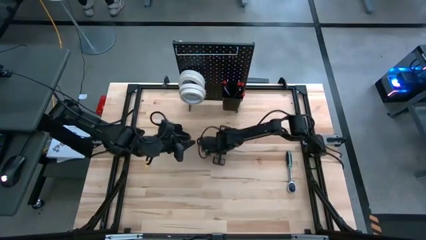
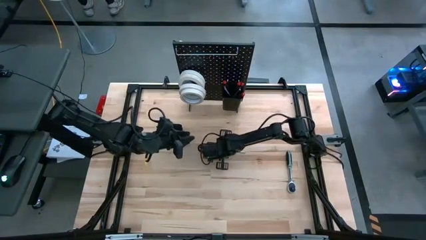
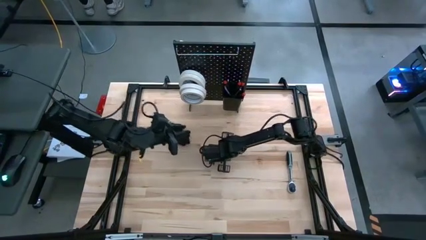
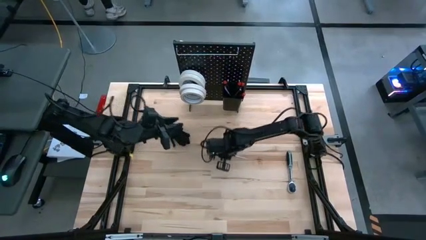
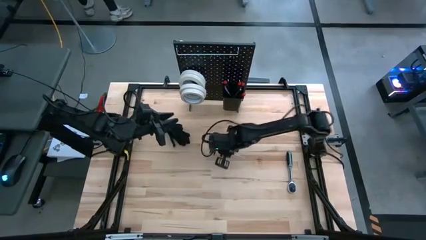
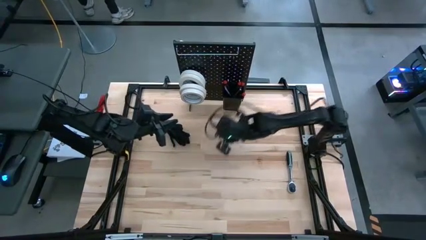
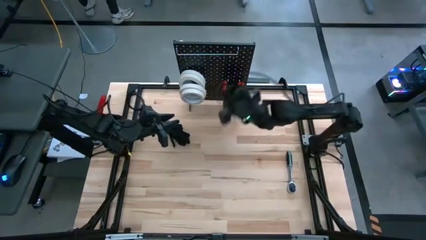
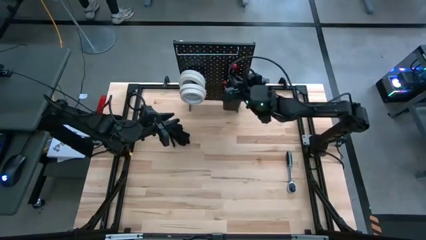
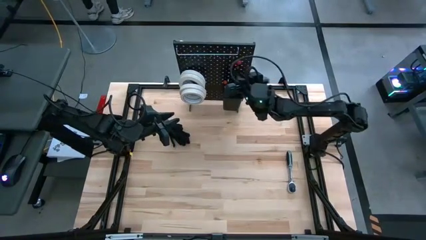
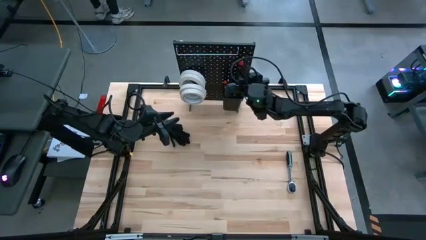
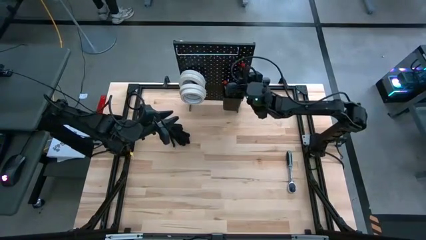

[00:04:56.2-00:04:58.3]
Task: Hang tools onto peg board
Put the black nut driver into the black bin on the peg board

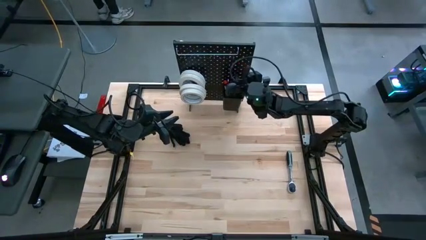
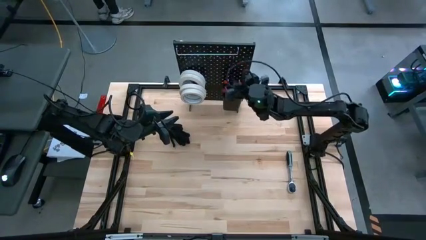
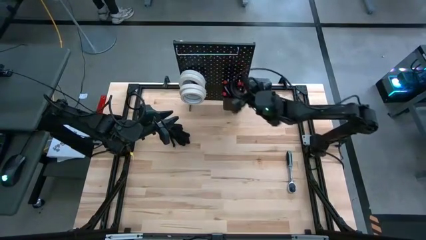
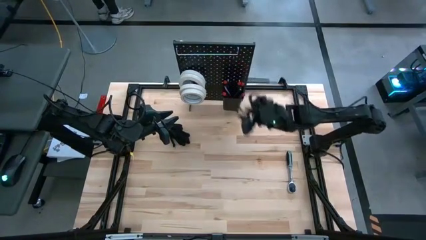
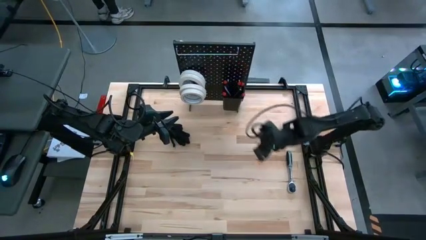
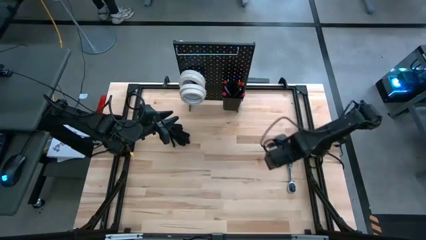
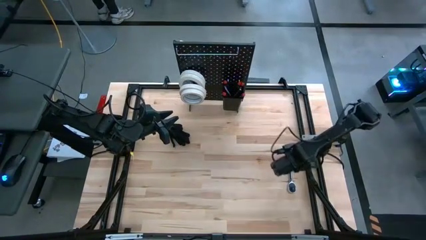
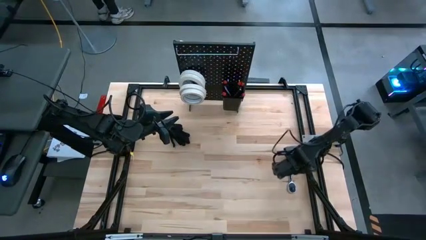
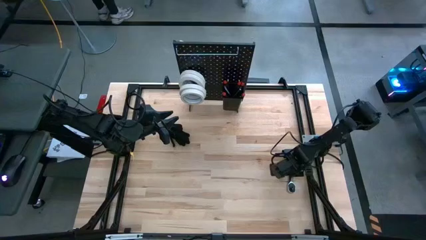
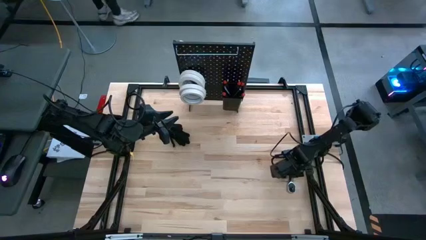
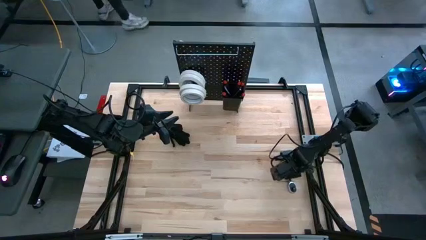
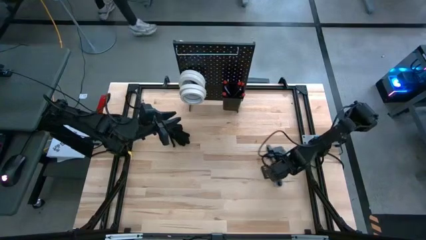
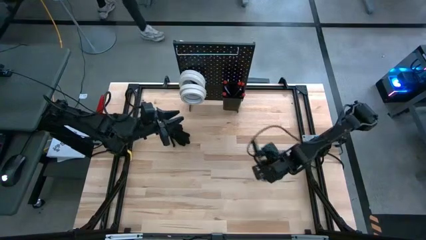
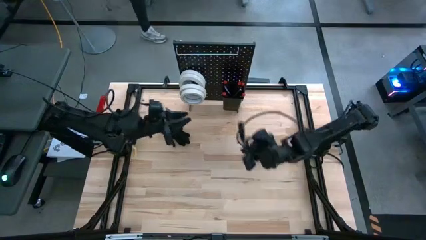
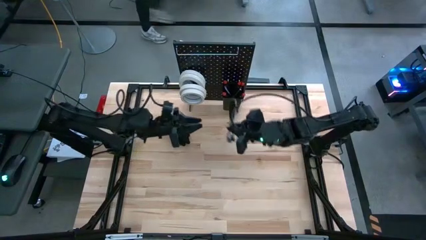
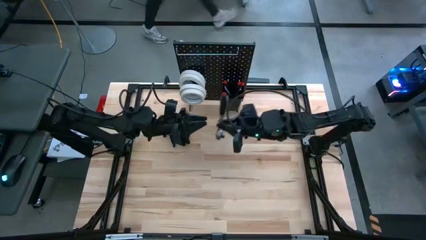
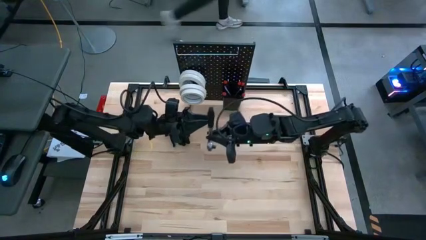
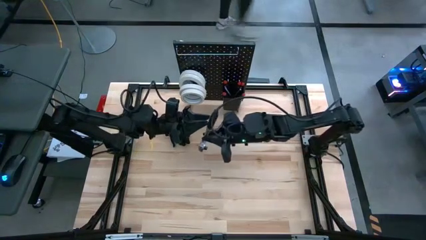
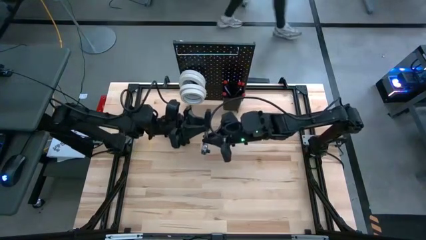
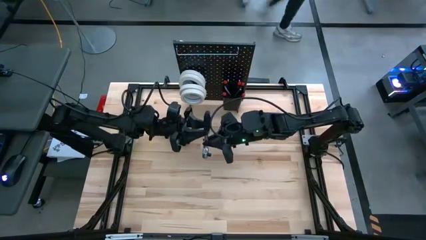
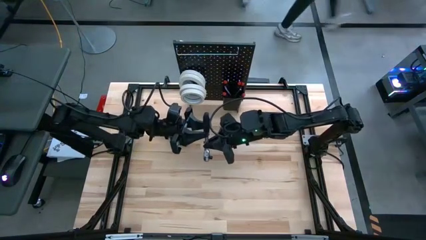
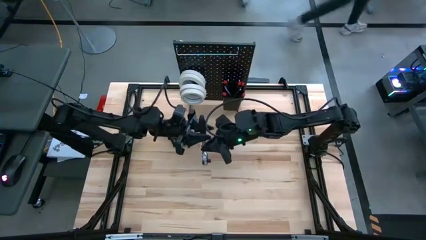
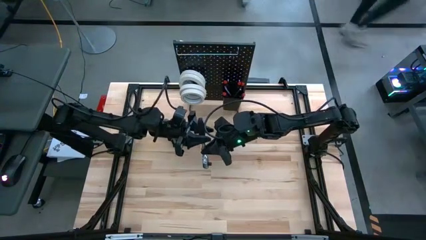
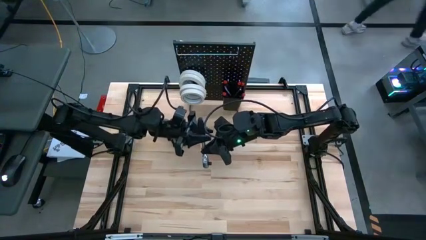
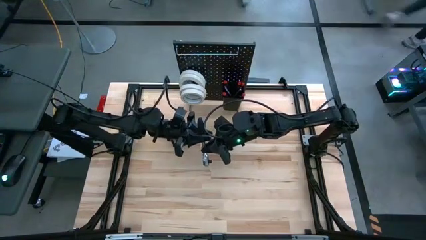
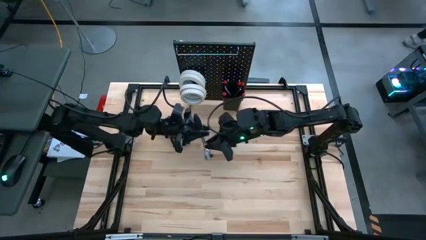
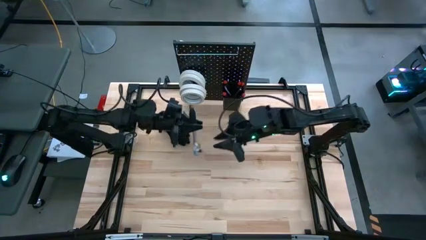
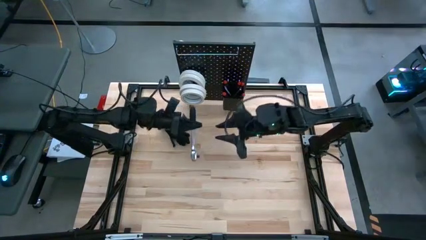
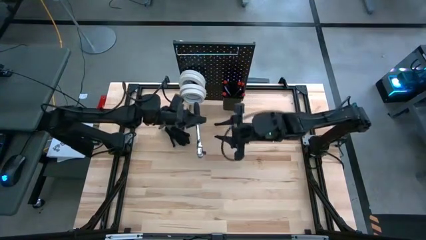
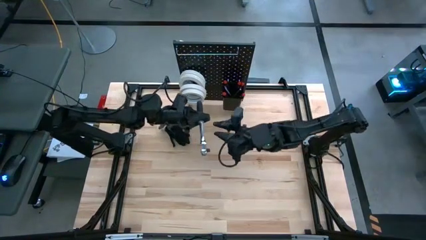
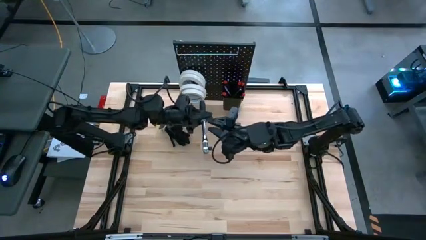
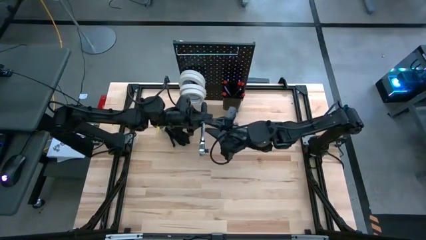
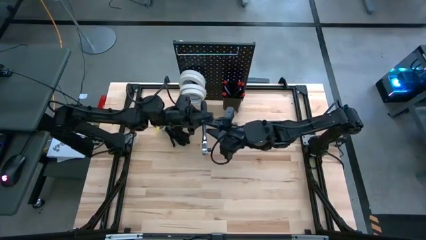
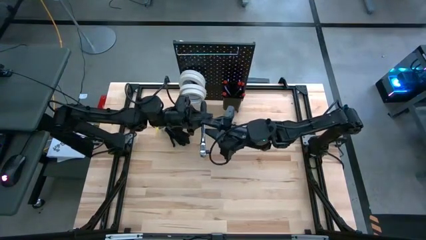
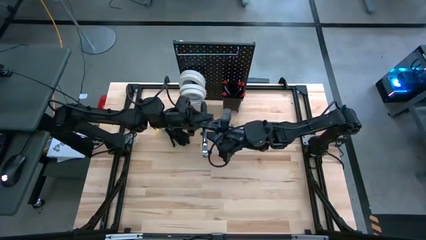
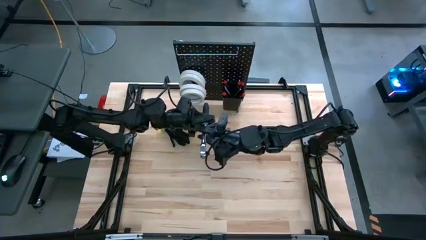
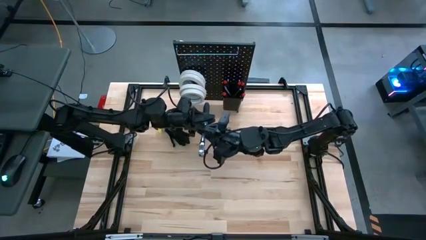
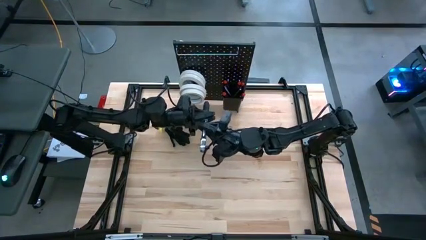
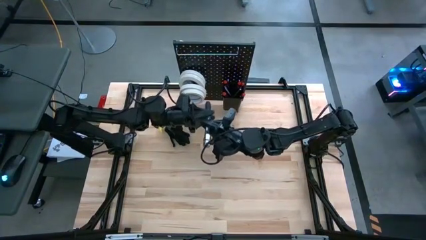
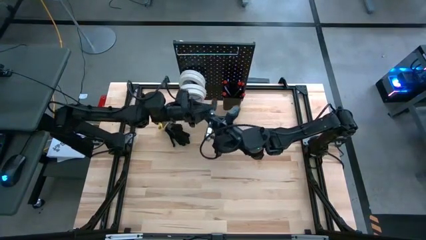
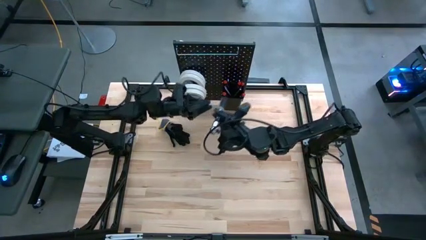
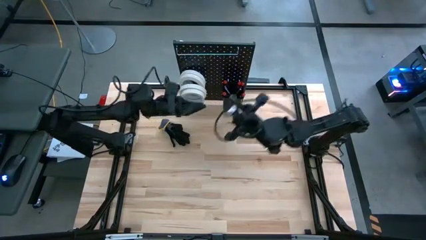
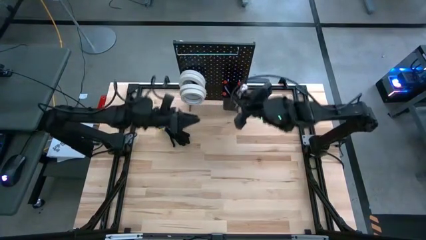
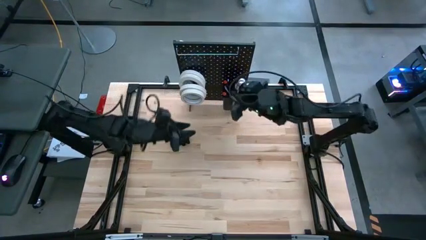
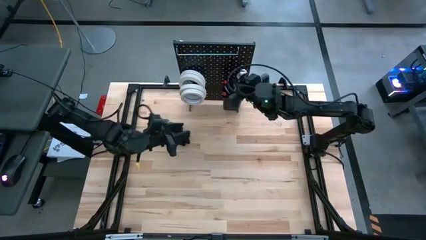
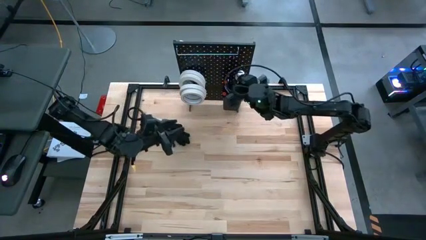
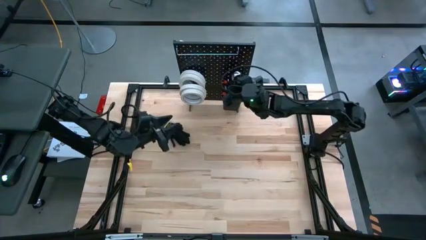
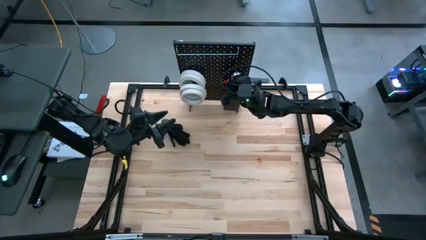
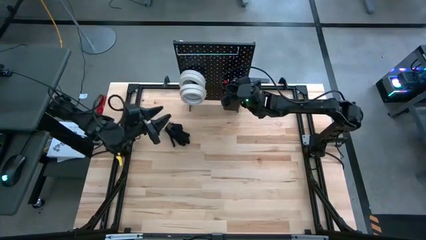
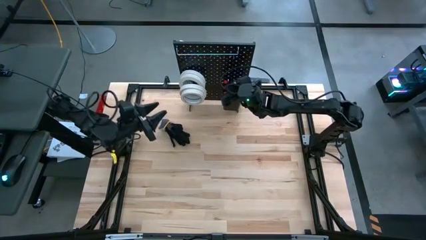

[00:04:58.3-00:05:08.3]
Put the black ratchet wrench into the black bin on the peg board

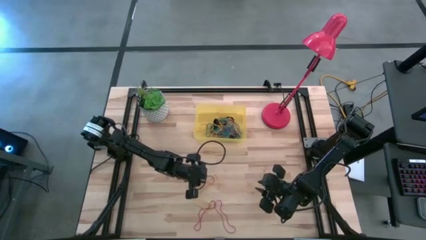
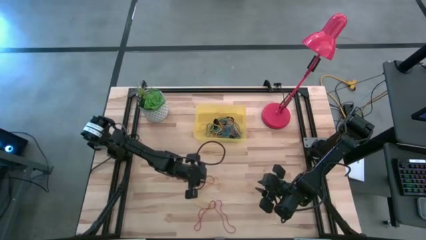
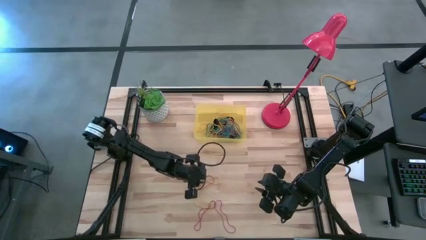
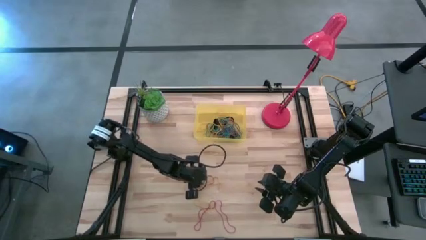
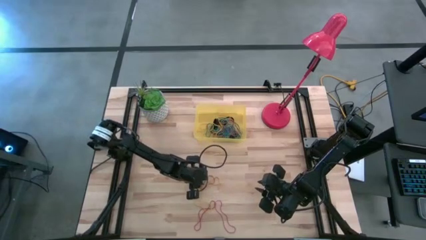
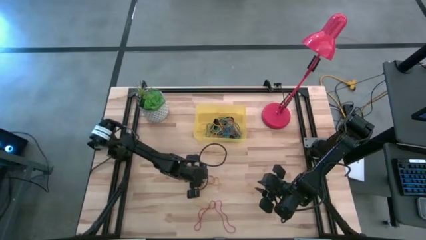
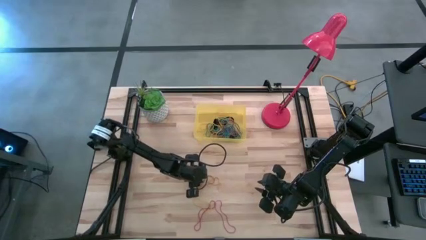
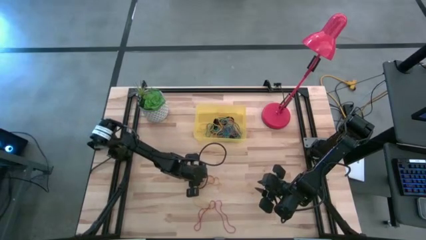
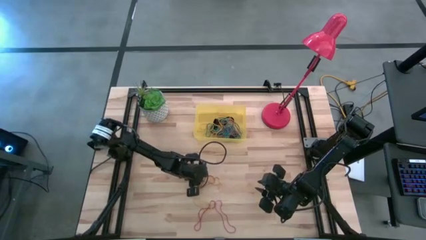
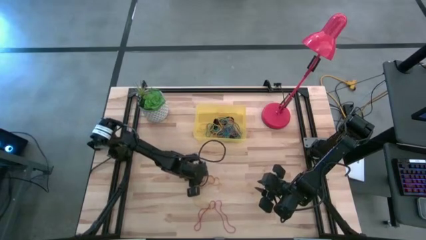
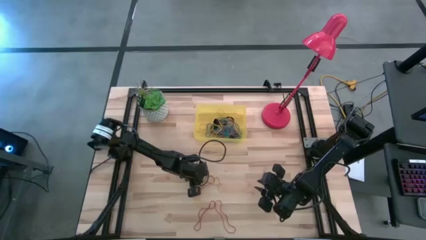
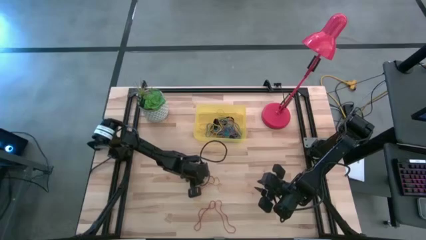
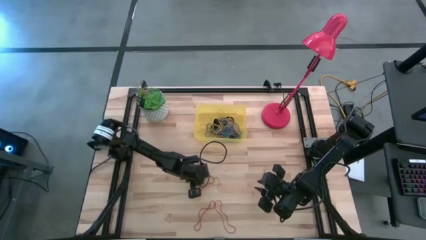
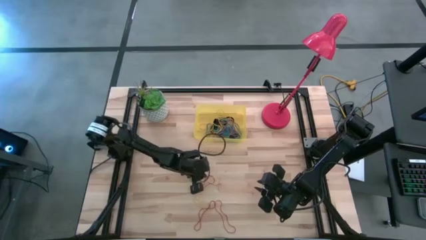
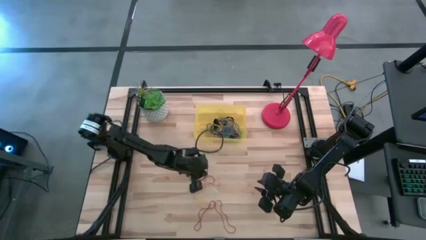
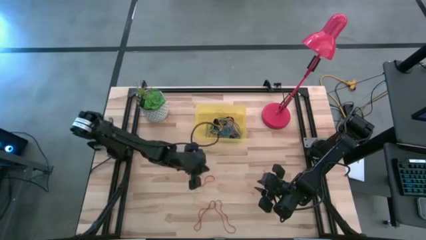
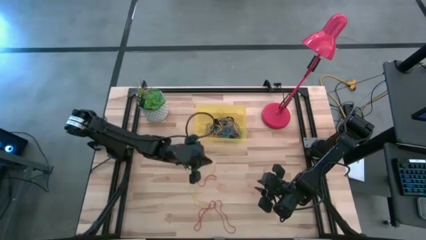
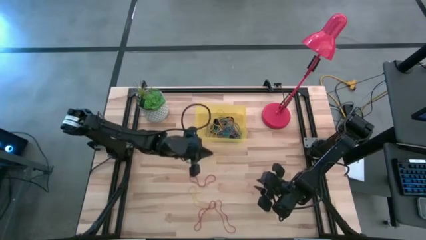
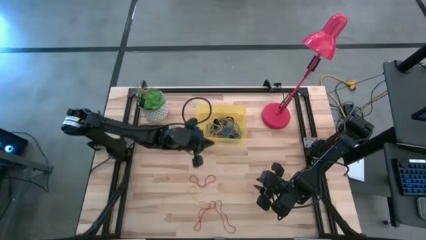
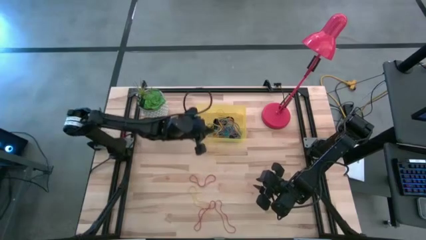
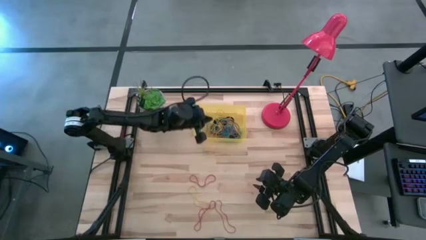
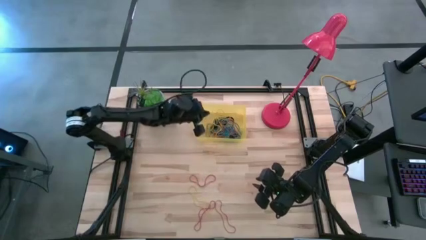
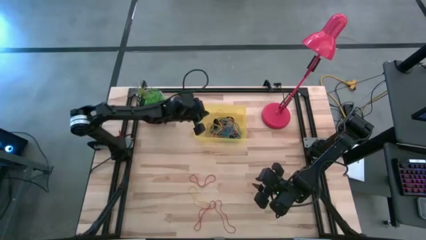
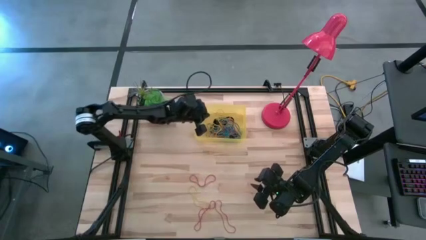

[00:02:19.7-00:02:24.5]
Task: Pick and place rubber bands into bin
Put the yellow rubber band into the yellow bin
